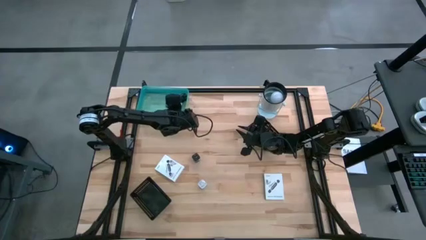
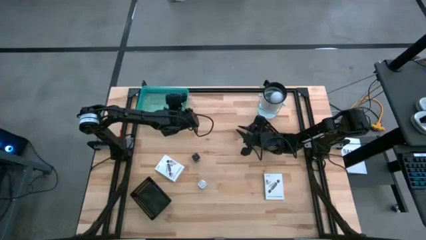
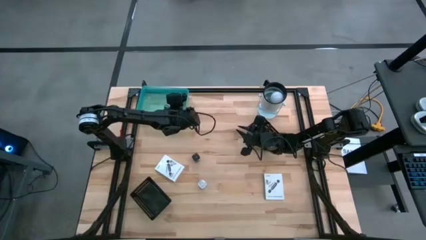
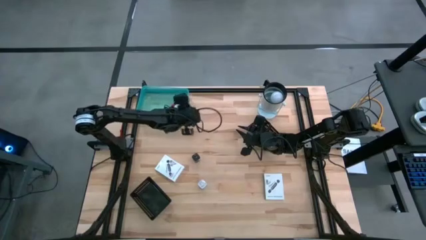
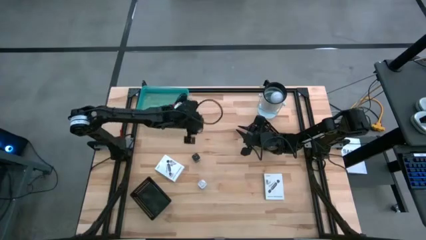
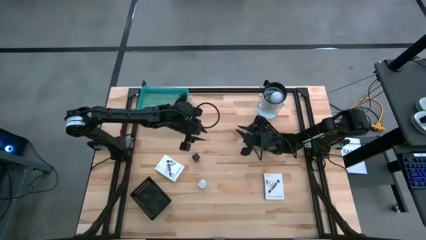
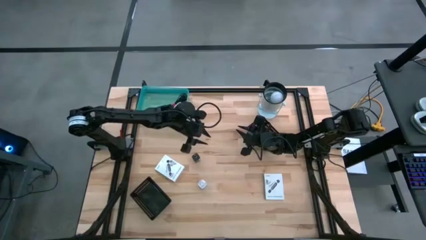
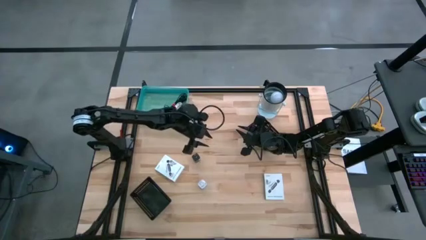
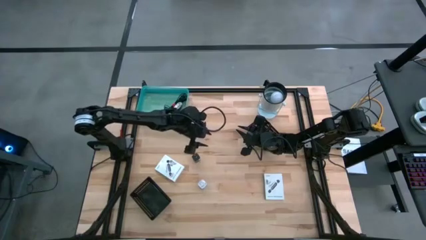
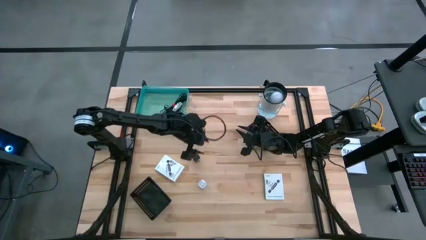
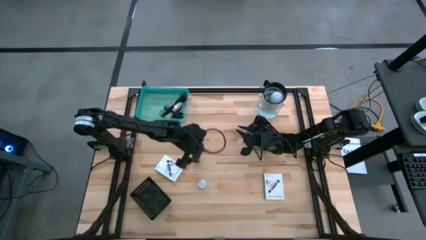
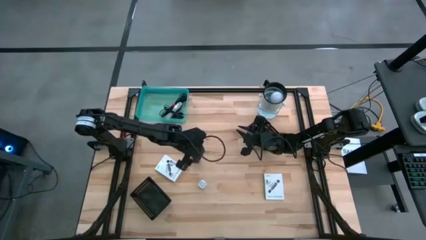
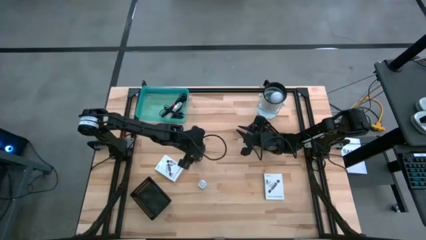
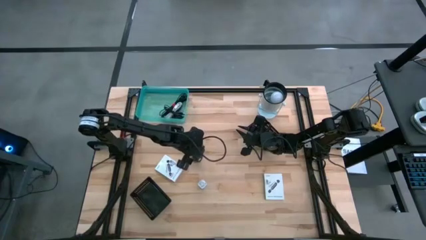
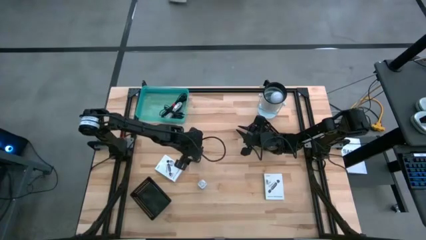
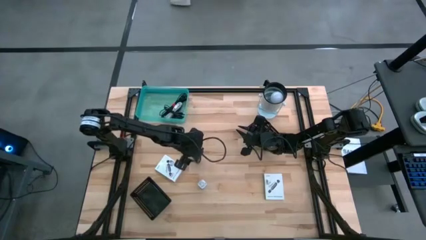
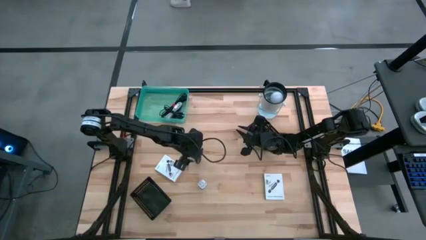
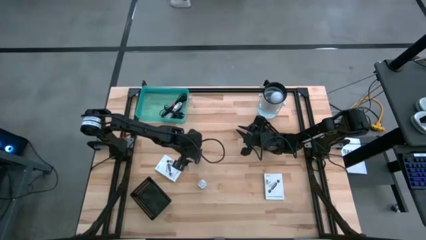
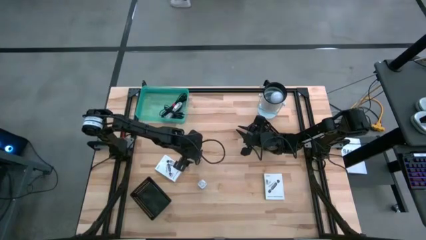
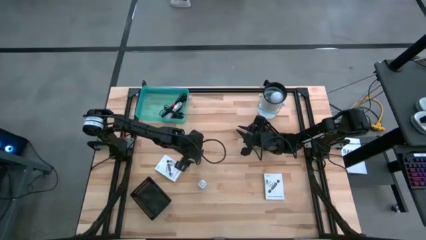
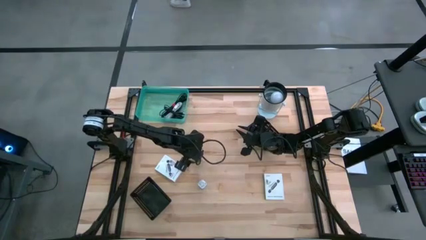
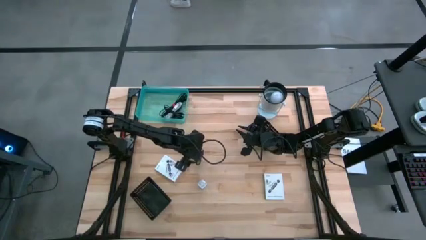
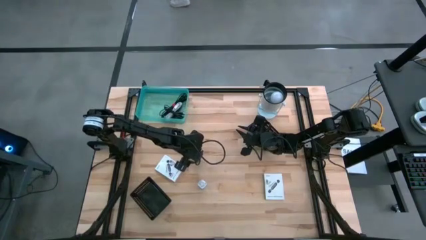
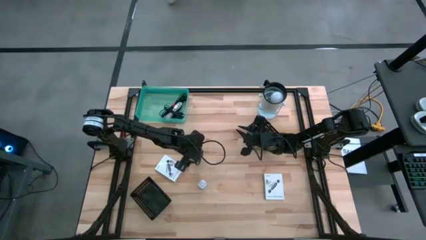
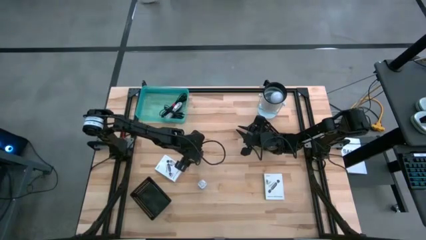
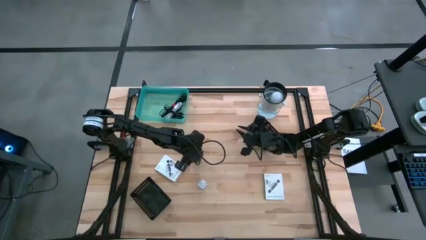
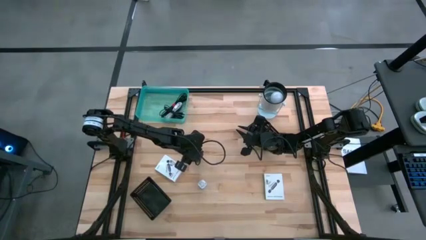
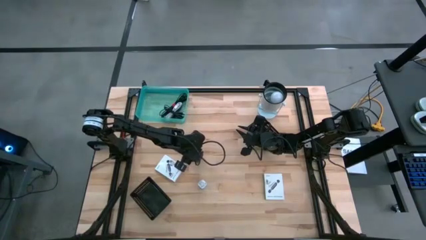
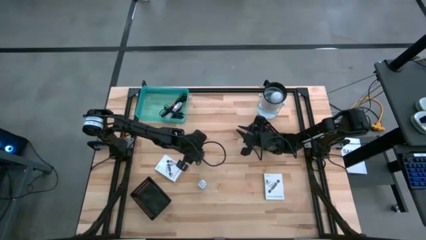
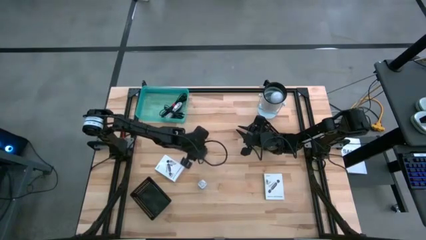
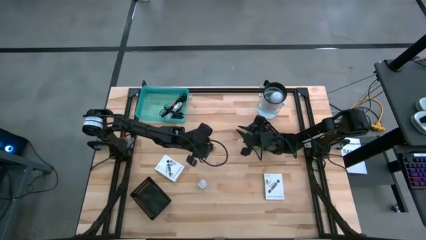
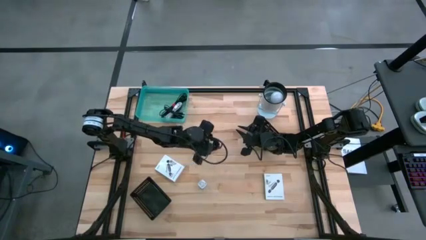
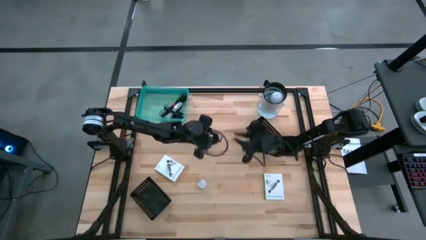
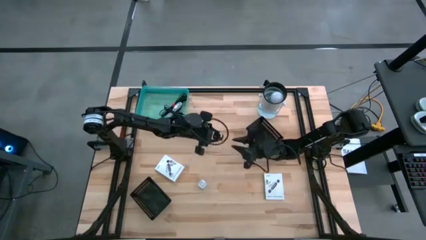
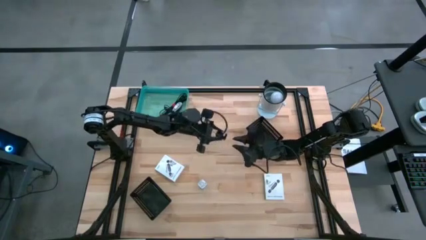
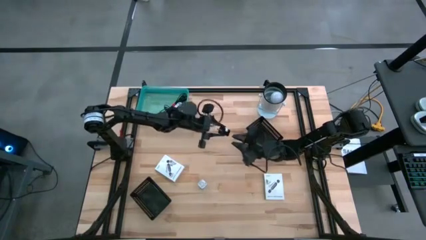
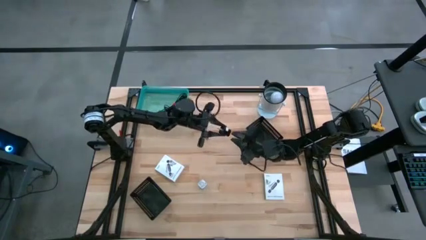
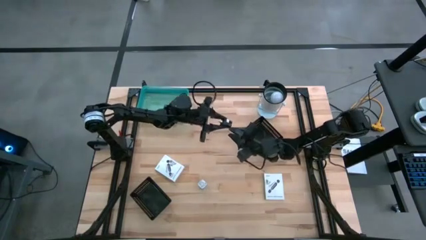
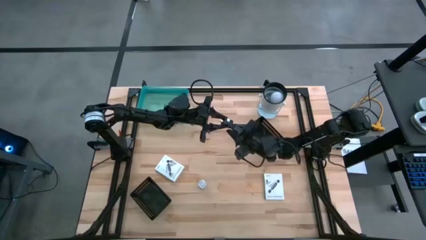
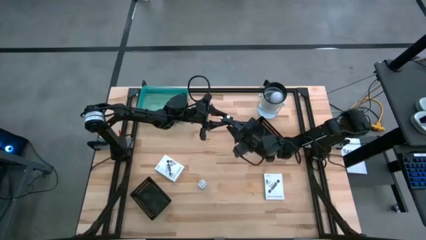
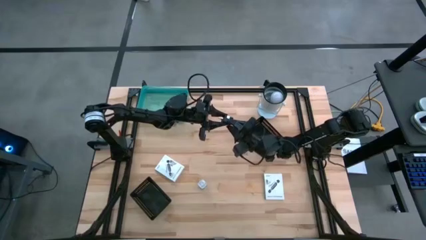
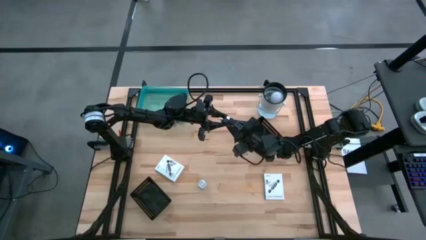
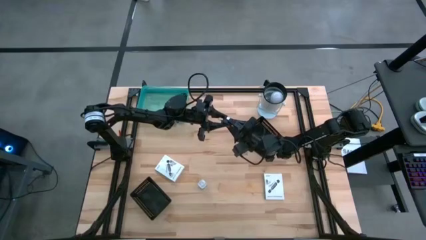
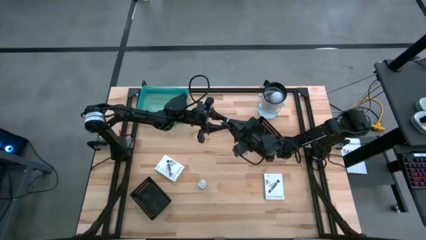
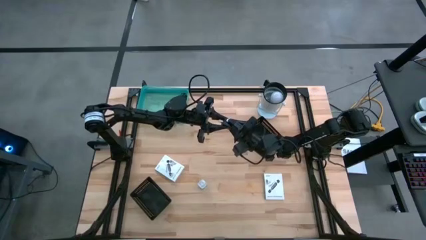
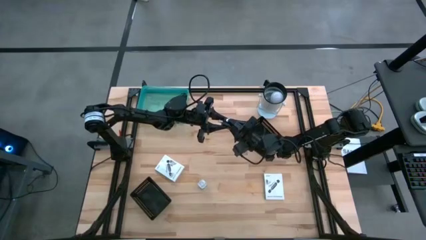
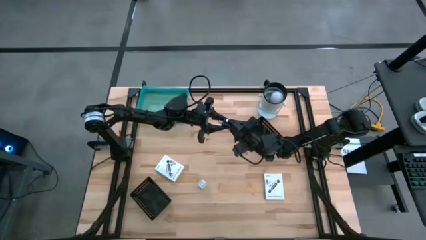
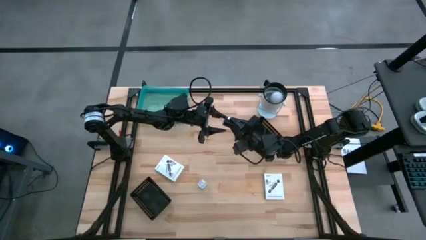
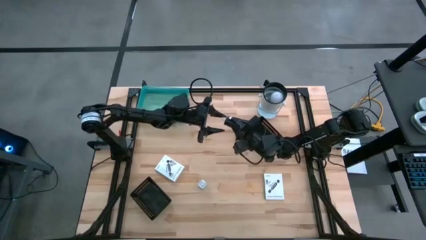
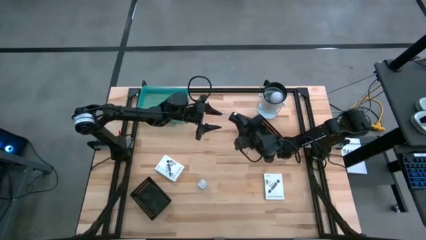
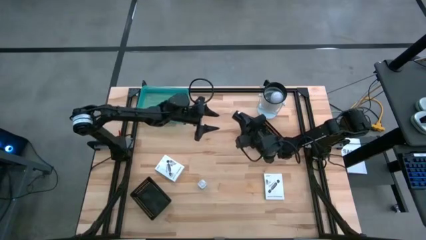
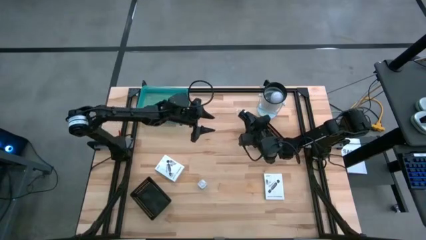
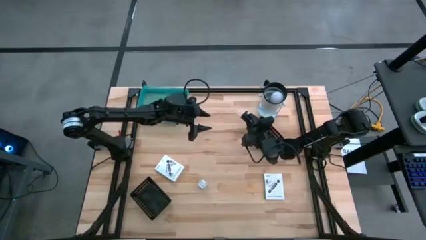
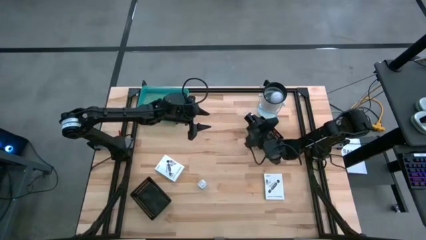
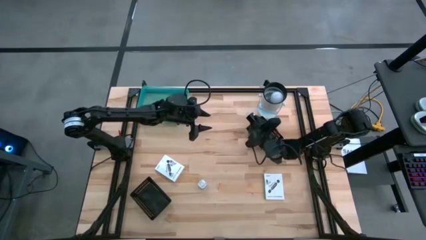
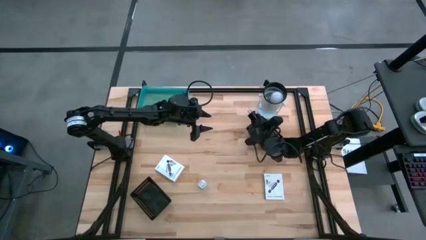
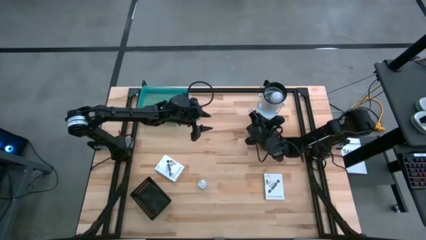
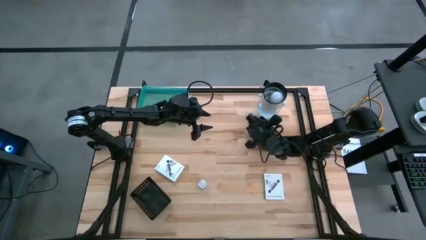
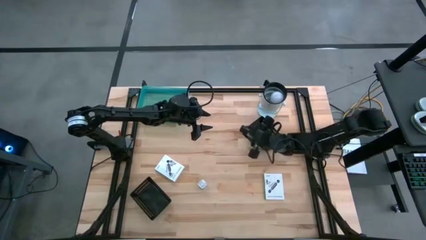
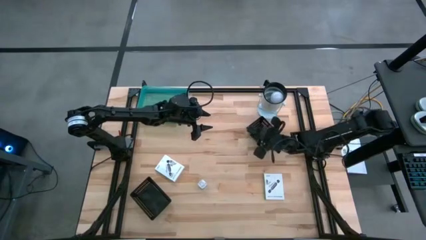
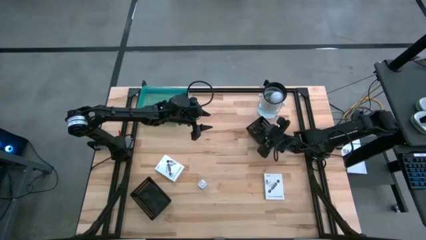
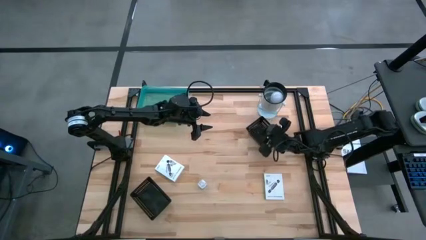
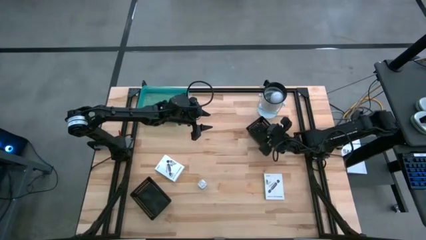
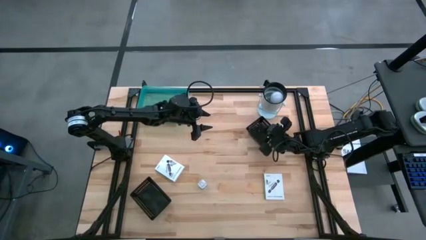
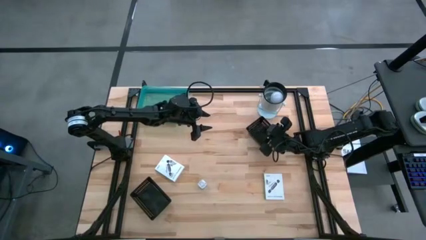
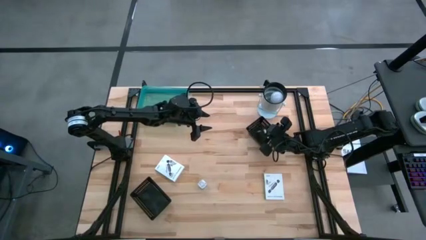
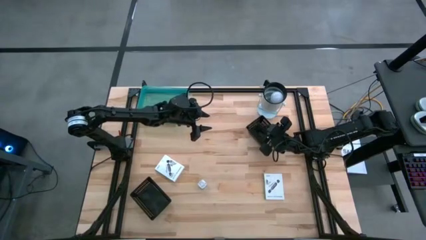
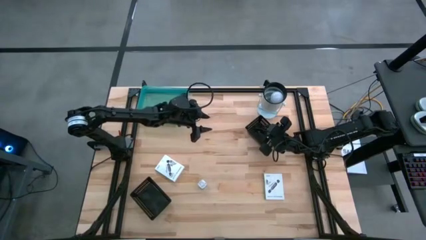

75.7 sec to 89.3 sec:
Task: Pick and place items into bin
Put the black charger adapter into the top black bin
